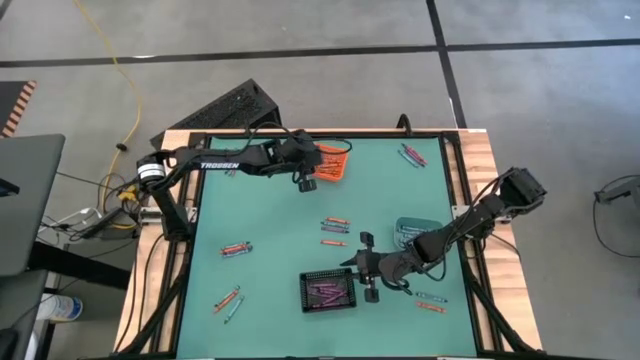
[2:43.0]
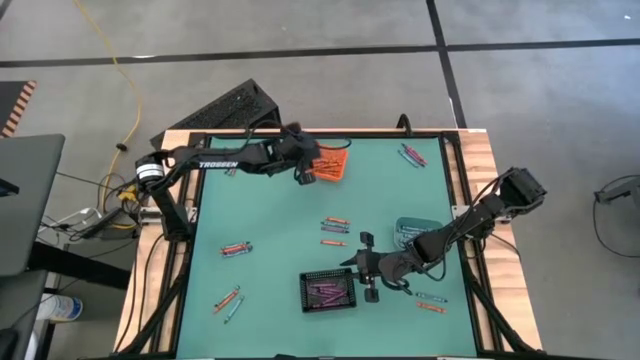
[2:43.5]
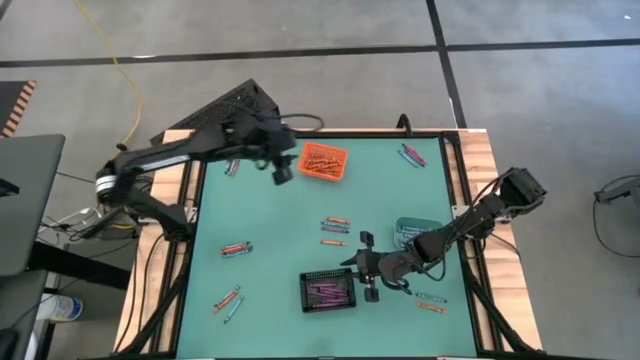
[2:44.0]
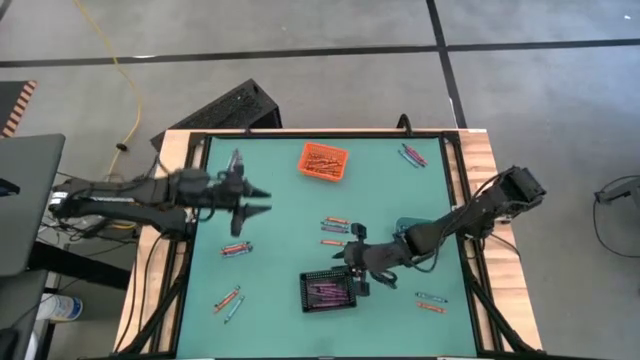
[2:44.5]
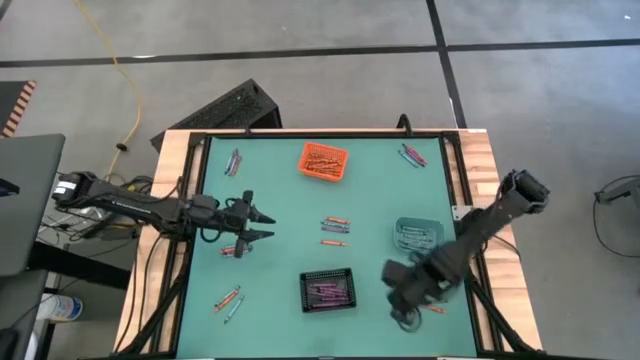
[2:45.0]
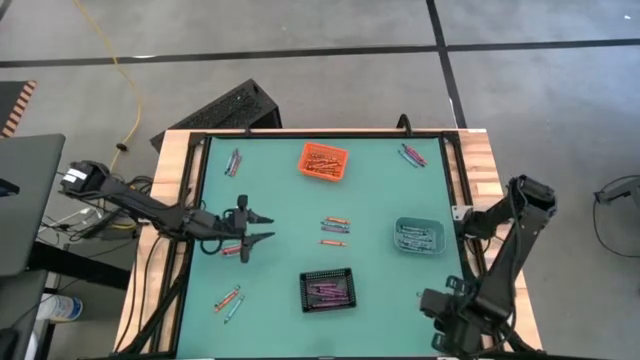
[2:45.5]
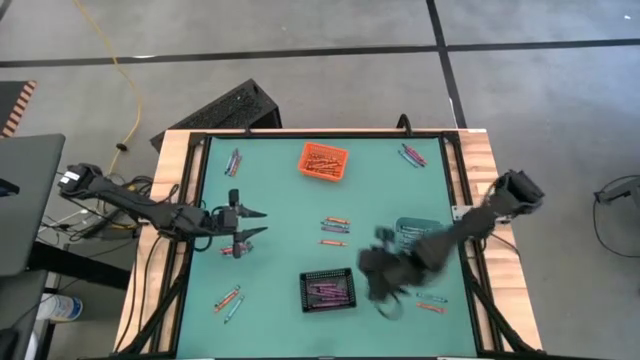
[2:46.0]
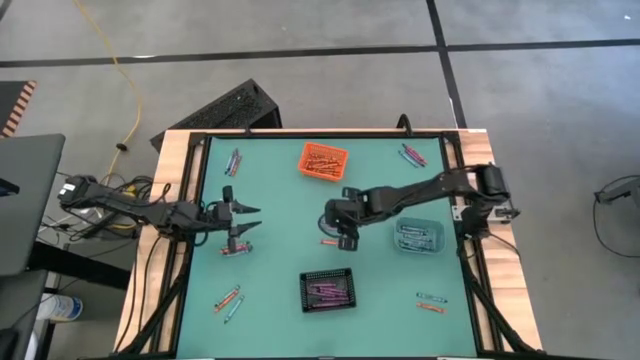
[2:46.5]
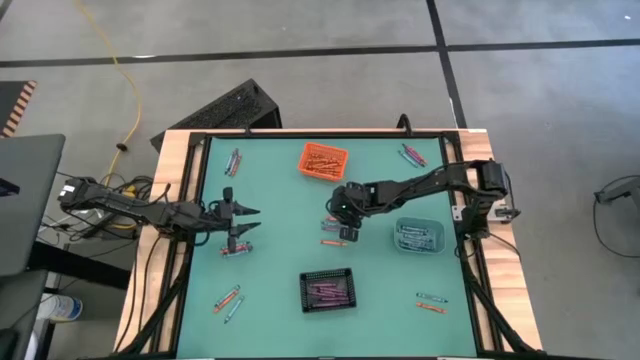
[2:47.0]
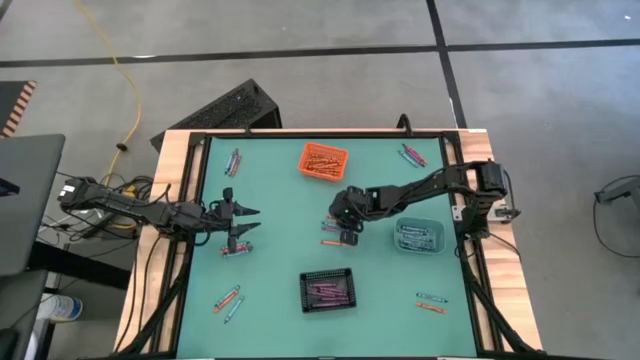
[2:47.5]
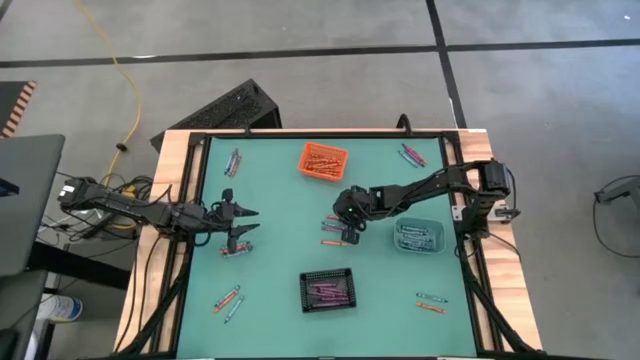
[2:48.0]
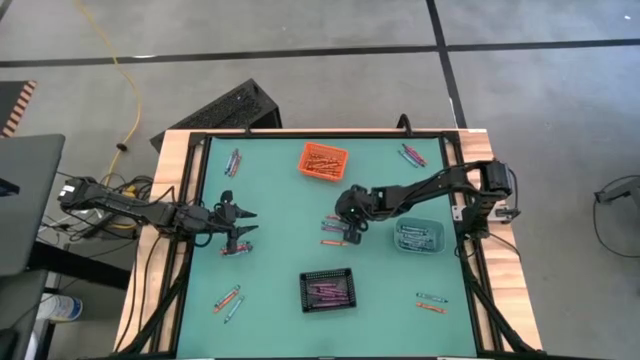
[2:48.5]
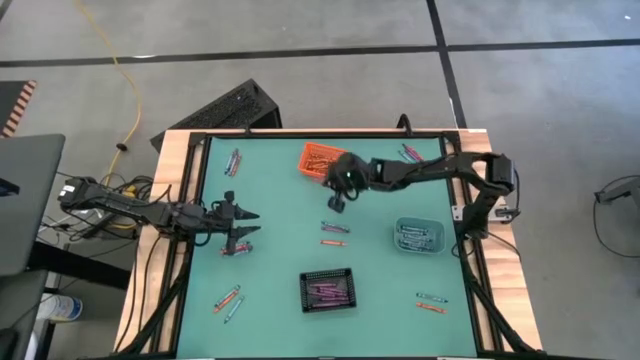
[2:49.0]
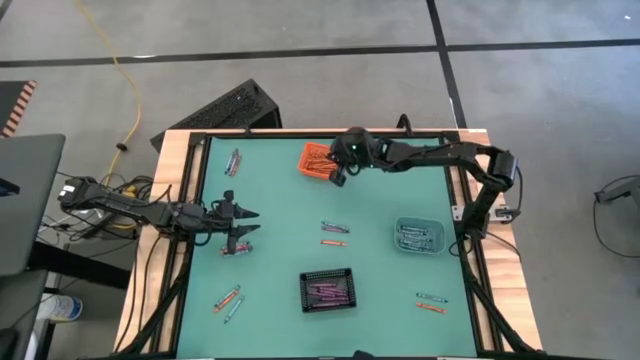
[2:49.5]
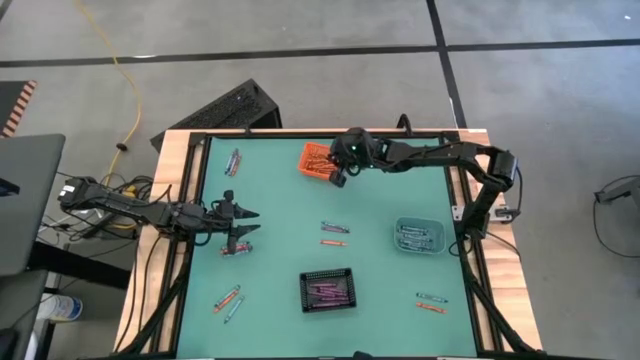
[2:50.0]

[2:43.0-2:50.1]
Task: Sort crayons
Put the orange crayon into the orange bin

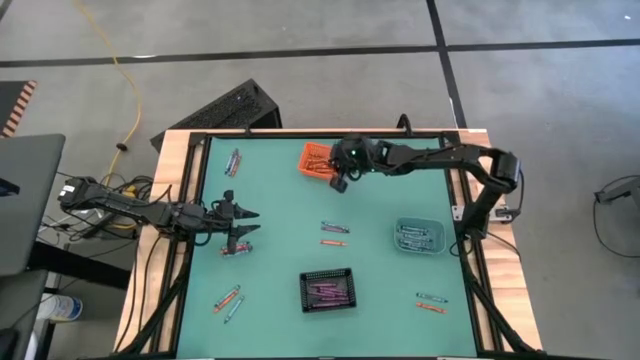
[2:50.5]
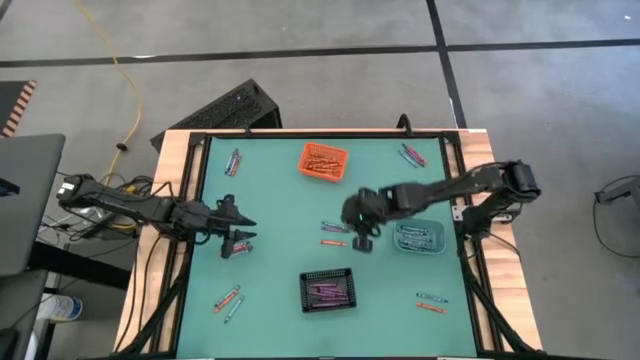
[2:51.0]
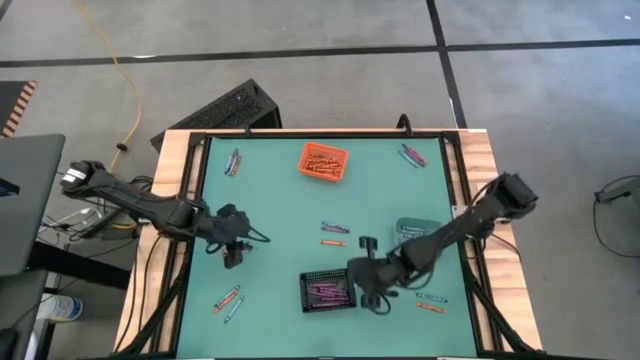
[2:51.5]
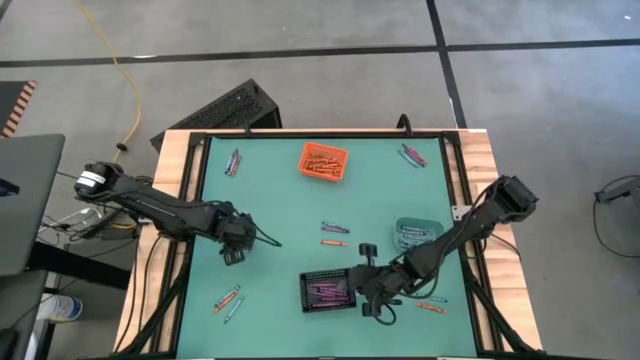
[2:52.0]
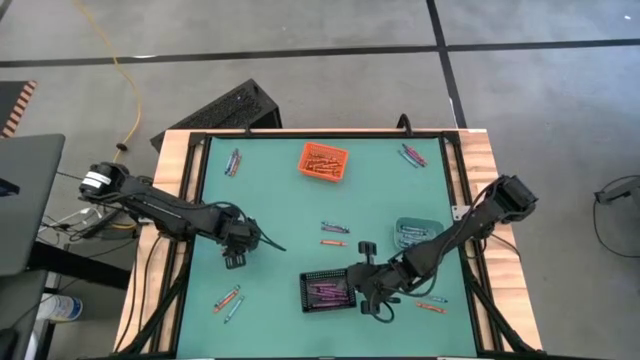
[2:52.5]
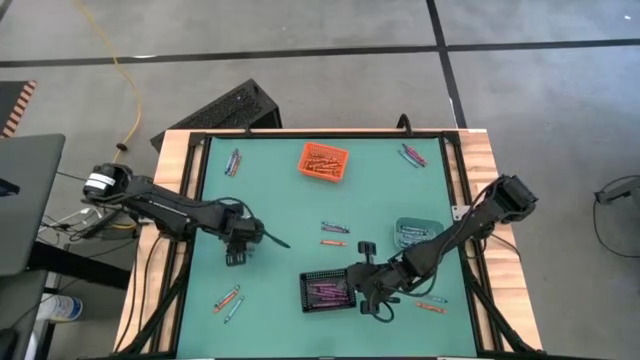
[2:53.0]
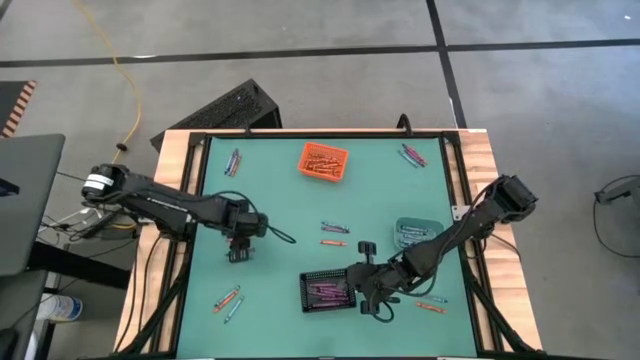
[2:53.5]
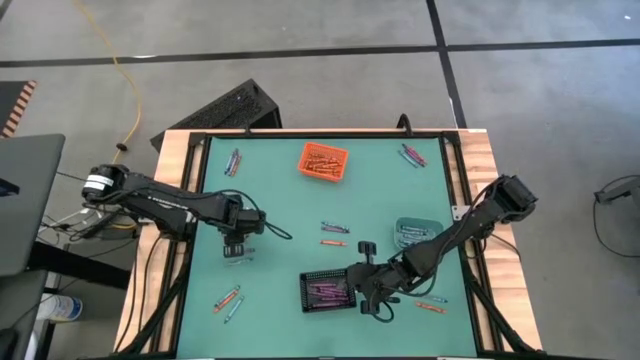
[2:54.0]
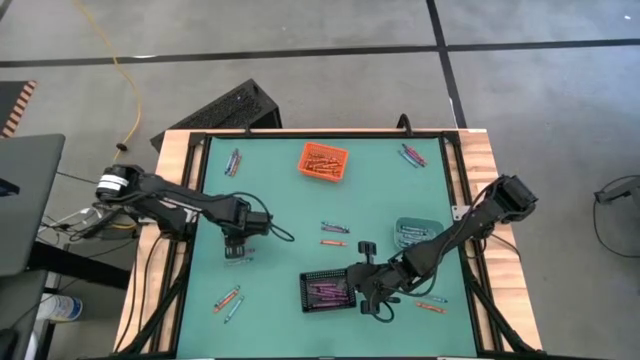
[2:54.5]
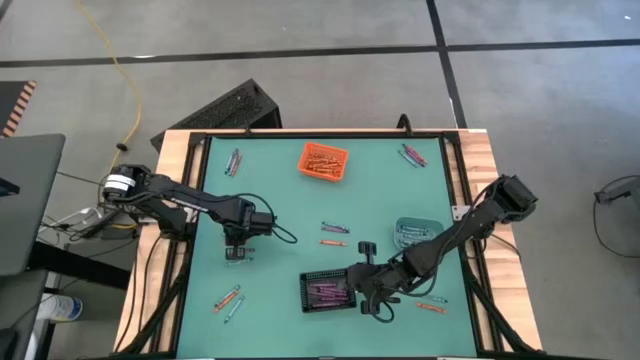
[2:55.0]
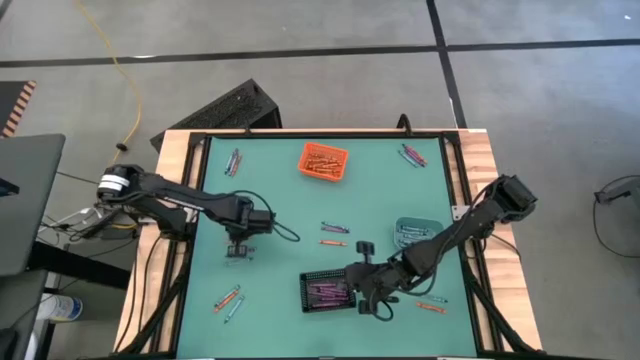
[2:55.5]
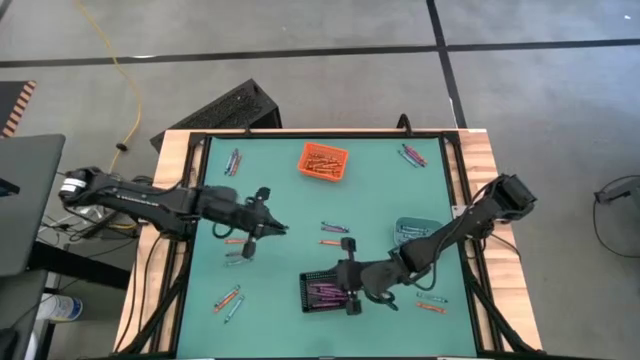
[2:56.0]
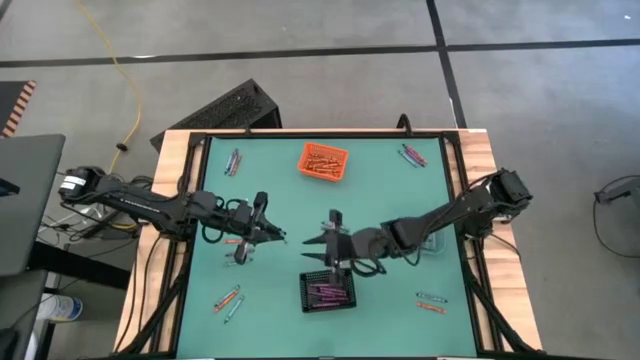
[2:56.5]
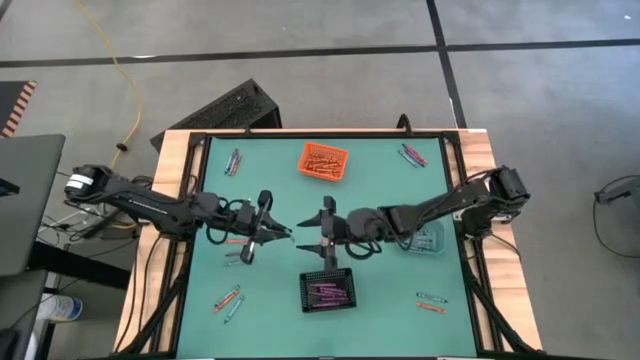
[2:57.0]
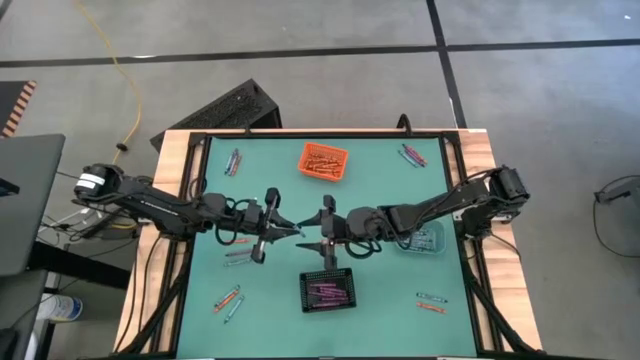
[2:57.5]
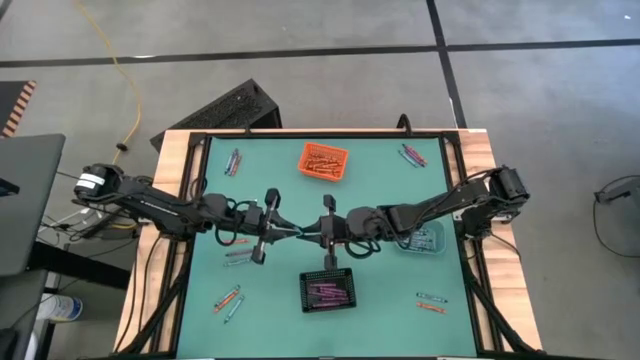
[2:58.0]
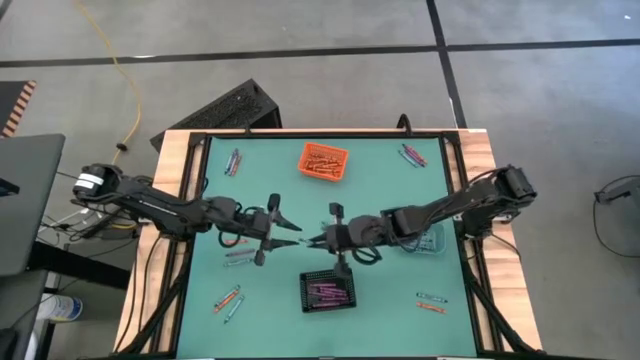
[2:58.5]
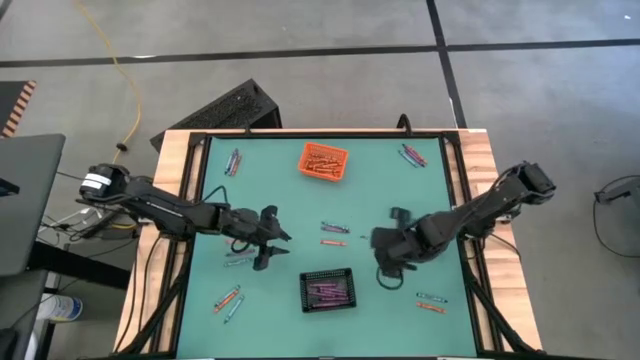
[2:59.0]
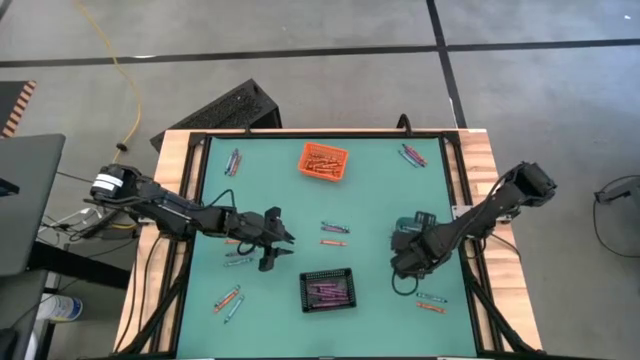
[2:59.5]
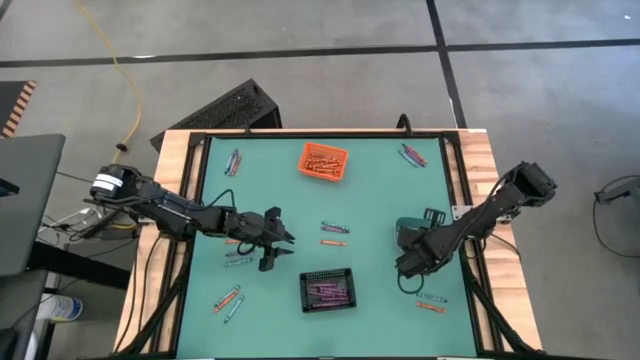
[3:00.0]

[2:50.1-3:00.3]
Put the blue crayon into the blue bin

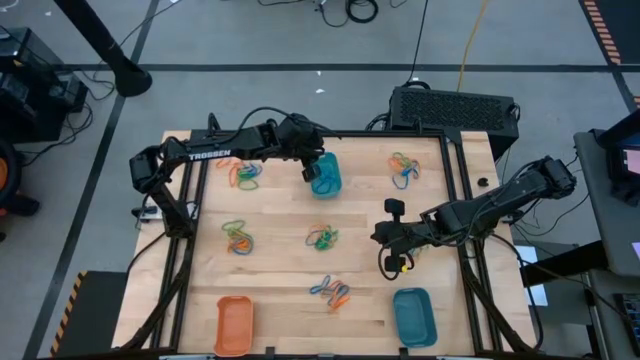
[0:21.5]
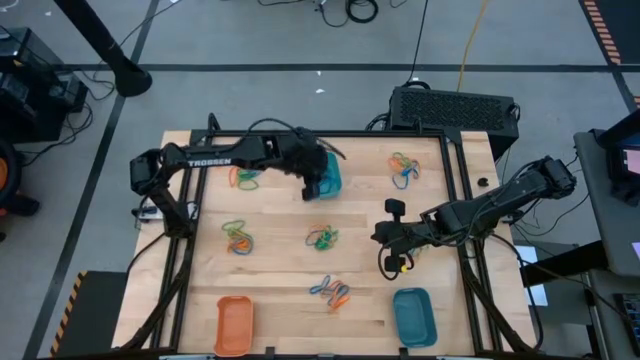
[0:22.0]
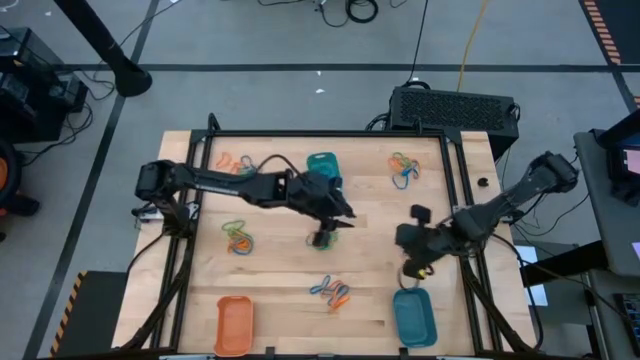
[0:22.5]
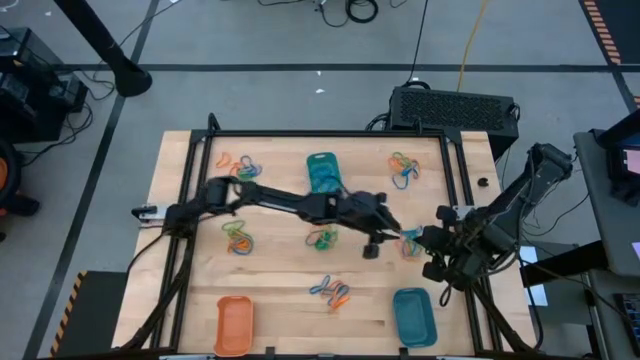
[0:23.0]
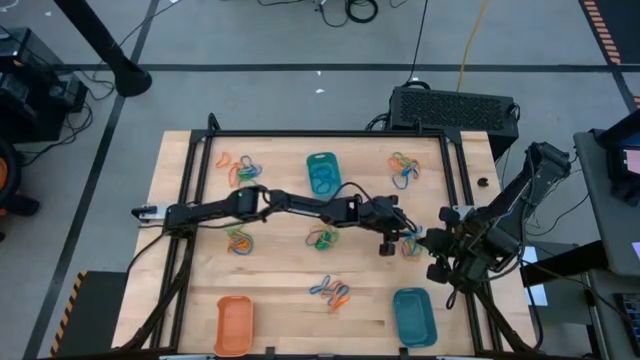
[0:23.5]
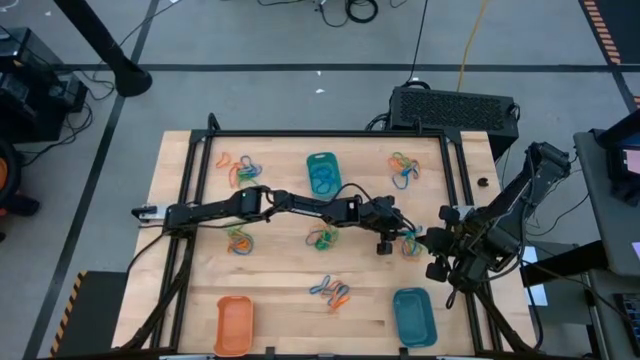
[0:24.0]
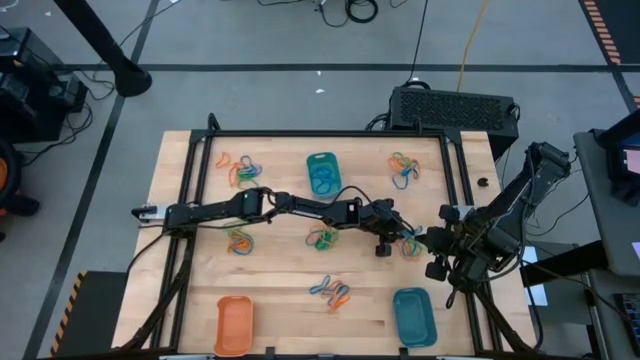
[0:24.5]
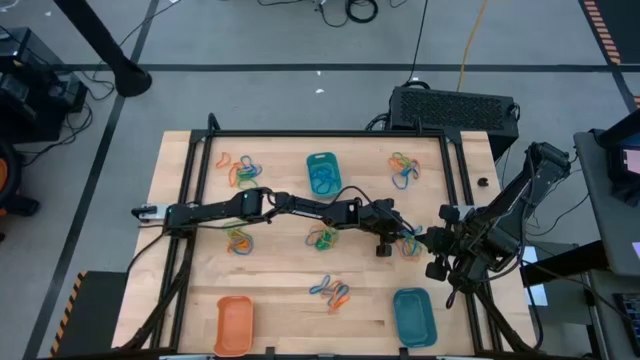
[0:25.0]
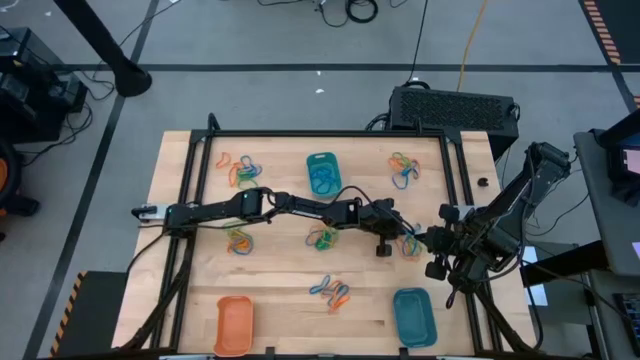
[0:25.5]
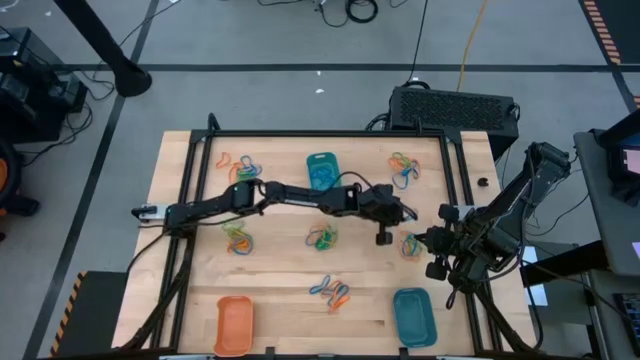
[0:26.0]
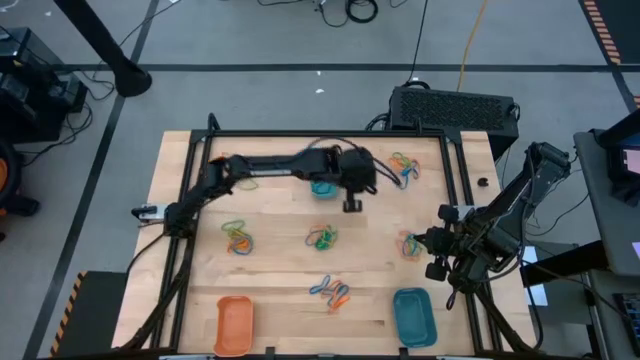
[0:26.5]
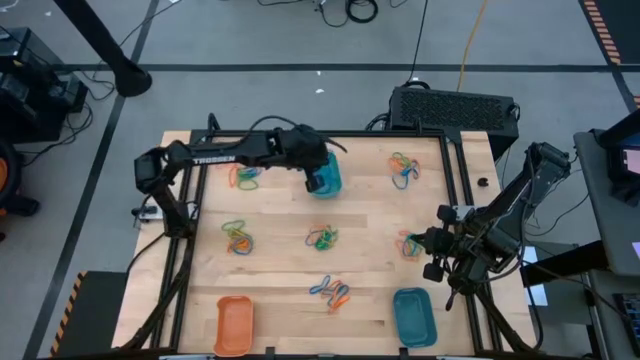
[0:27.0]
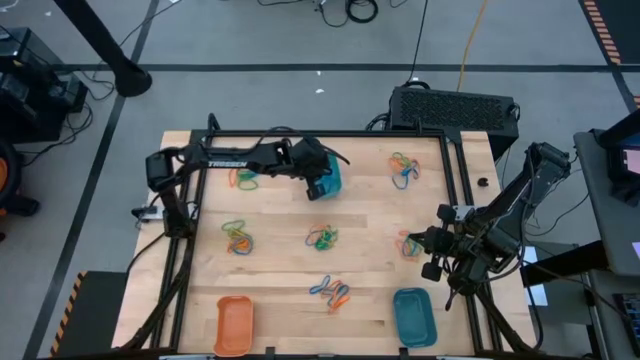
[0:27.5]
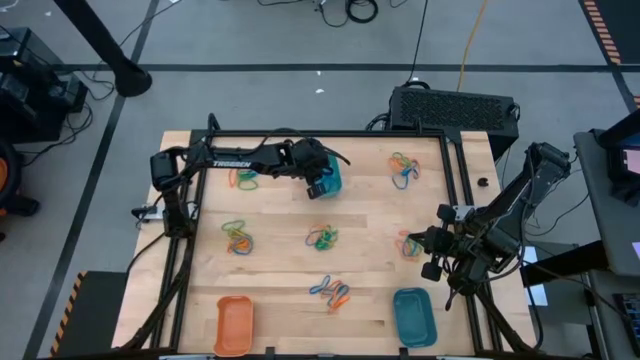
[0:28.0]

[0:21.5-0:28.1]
Task: Sort rubber bands into baskets
Put the blue rubber band into the top blue bin
